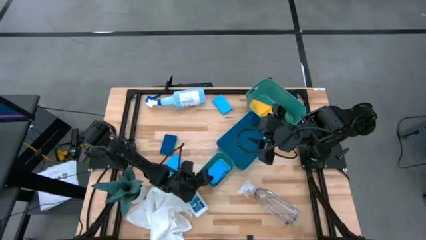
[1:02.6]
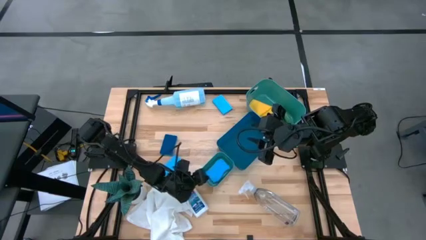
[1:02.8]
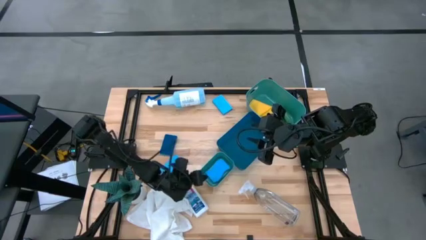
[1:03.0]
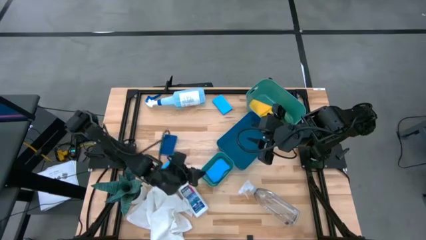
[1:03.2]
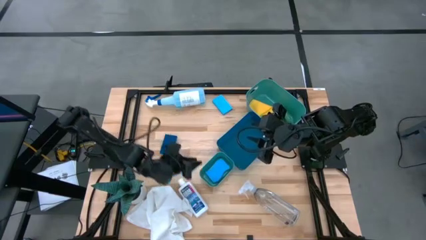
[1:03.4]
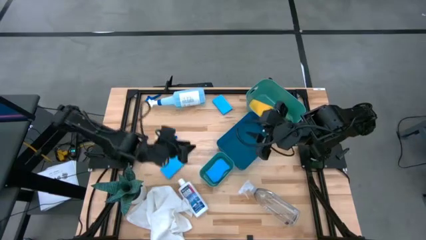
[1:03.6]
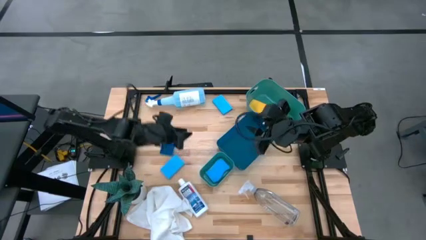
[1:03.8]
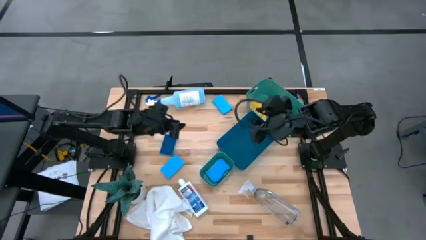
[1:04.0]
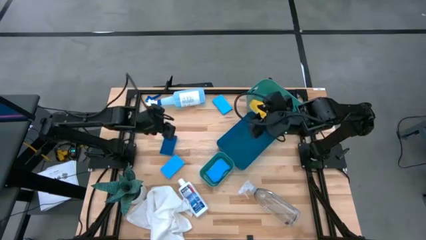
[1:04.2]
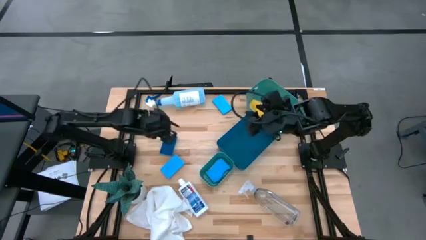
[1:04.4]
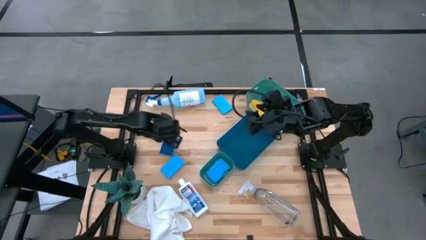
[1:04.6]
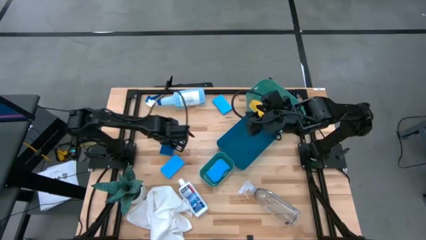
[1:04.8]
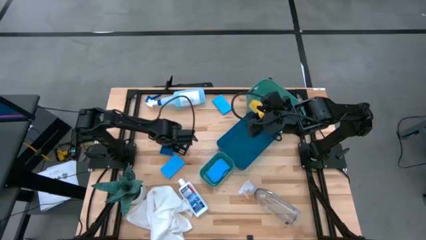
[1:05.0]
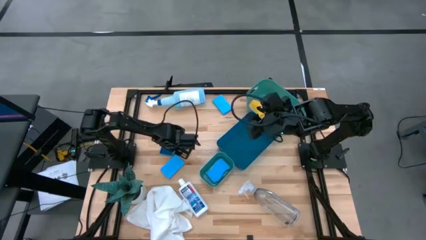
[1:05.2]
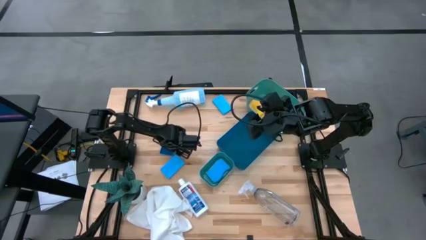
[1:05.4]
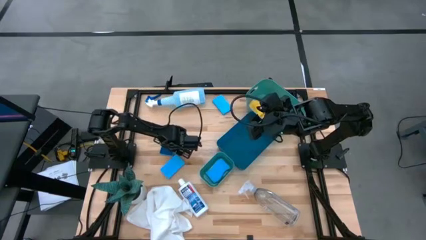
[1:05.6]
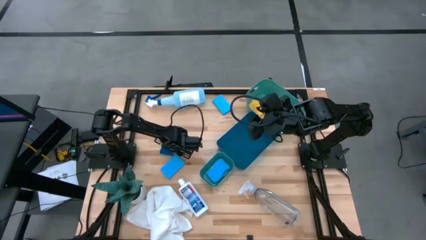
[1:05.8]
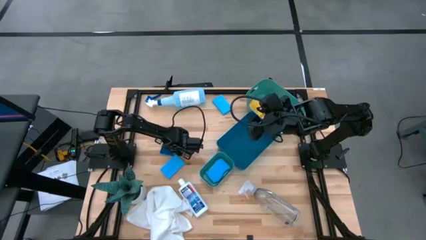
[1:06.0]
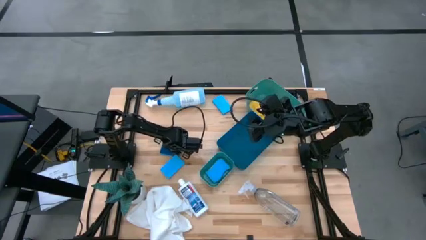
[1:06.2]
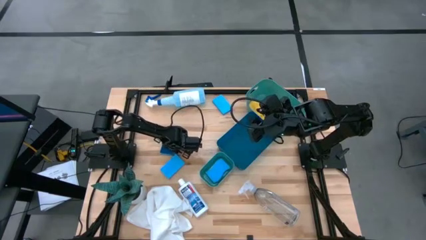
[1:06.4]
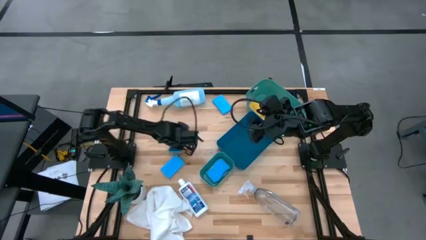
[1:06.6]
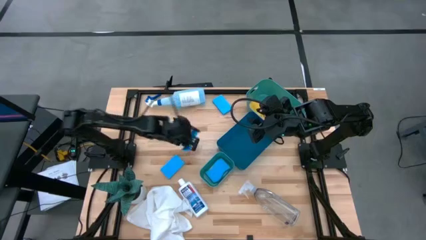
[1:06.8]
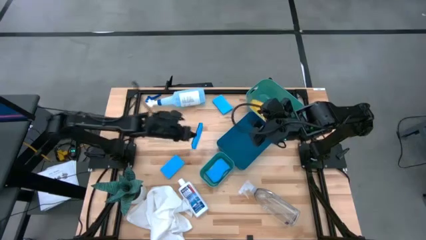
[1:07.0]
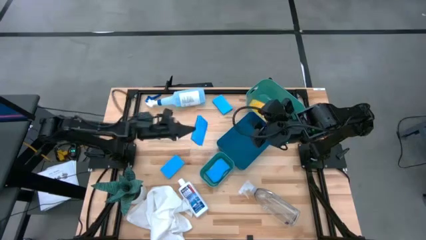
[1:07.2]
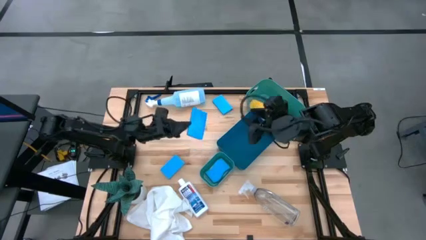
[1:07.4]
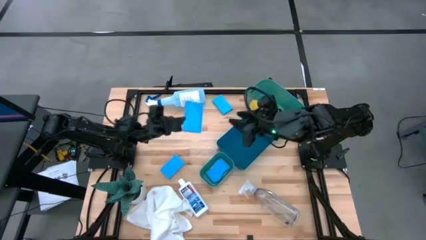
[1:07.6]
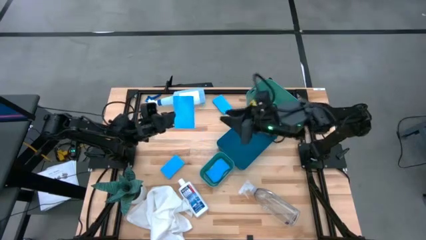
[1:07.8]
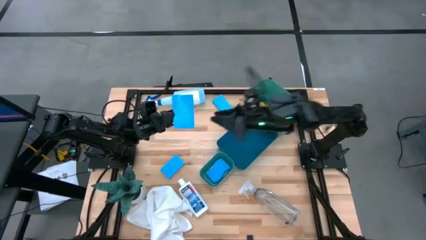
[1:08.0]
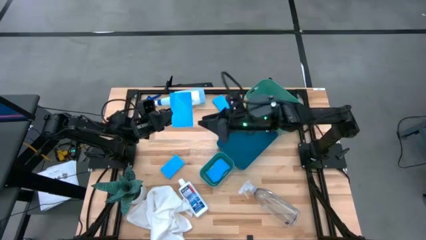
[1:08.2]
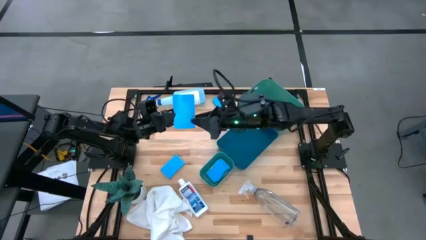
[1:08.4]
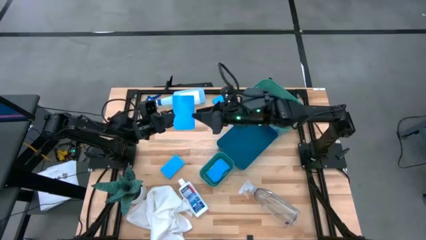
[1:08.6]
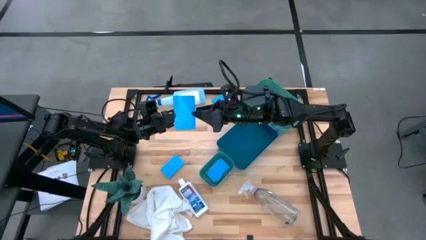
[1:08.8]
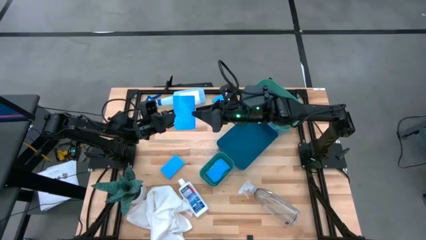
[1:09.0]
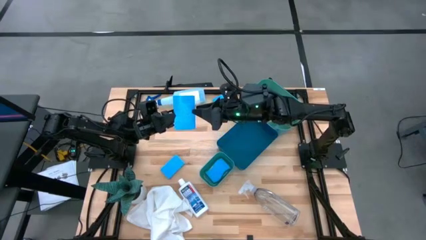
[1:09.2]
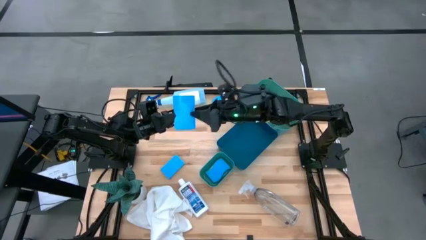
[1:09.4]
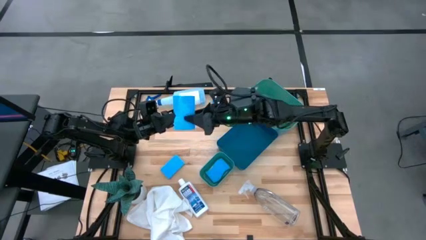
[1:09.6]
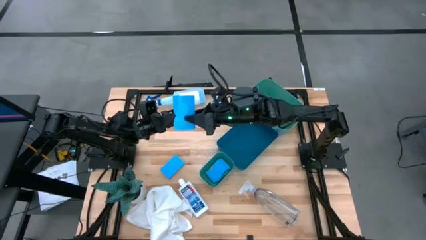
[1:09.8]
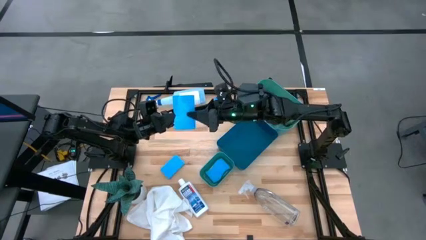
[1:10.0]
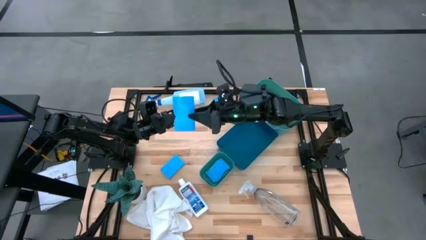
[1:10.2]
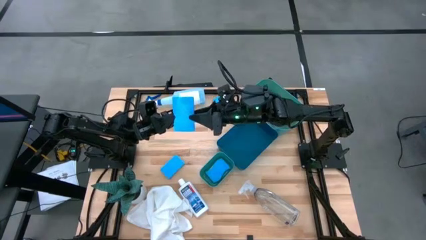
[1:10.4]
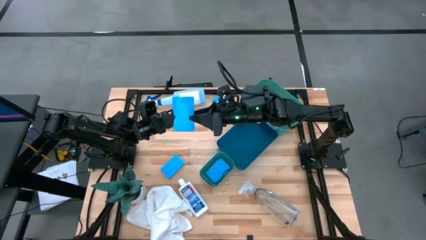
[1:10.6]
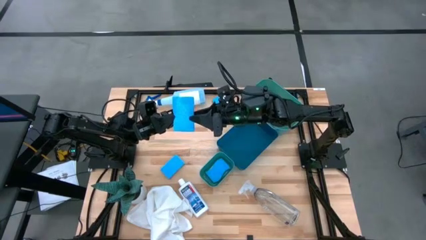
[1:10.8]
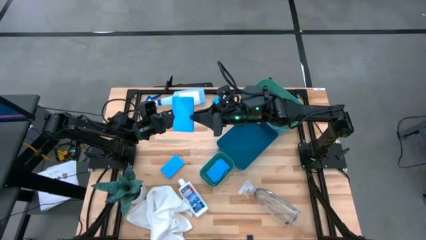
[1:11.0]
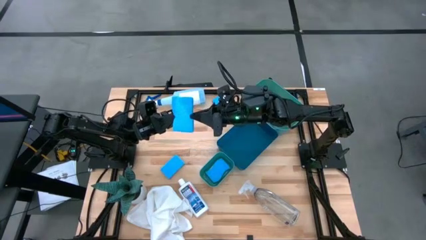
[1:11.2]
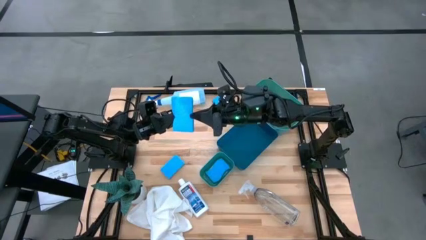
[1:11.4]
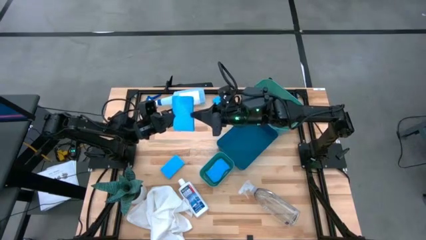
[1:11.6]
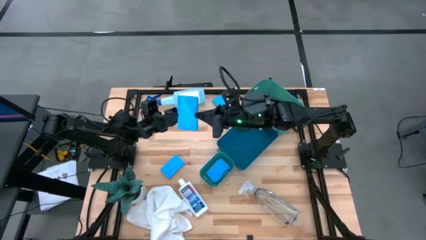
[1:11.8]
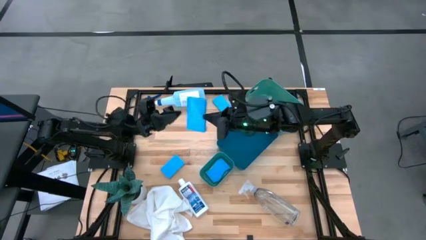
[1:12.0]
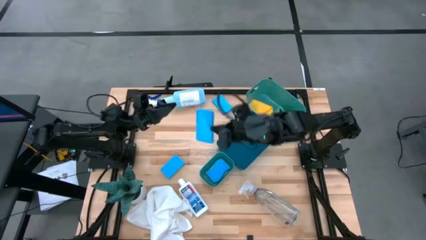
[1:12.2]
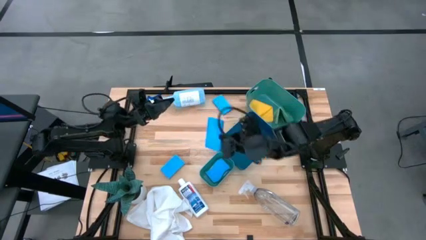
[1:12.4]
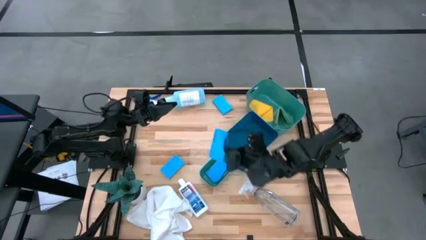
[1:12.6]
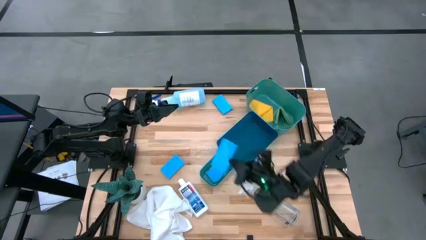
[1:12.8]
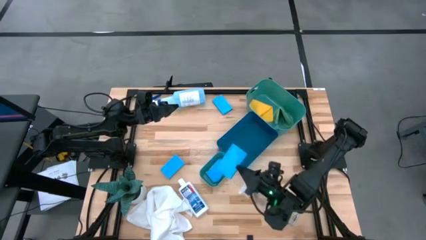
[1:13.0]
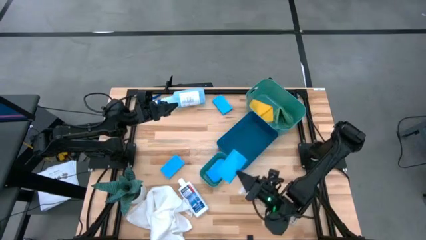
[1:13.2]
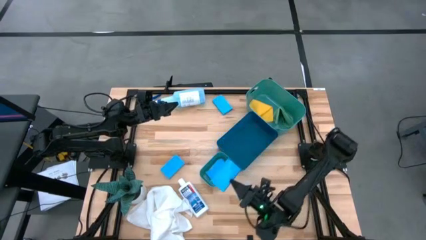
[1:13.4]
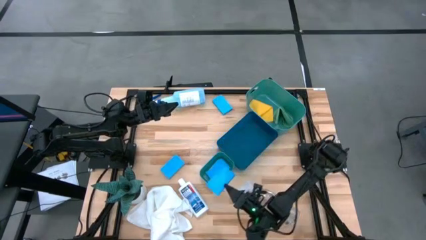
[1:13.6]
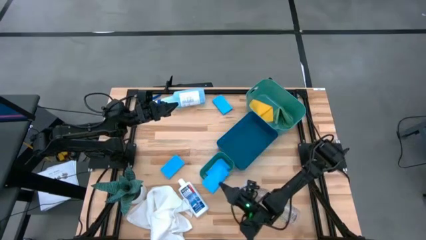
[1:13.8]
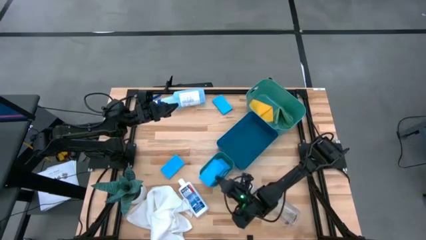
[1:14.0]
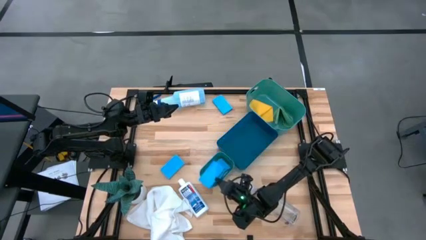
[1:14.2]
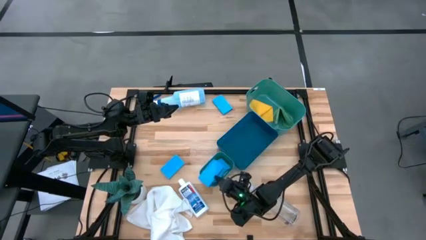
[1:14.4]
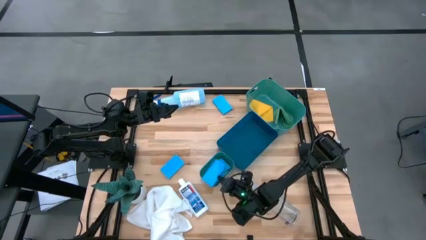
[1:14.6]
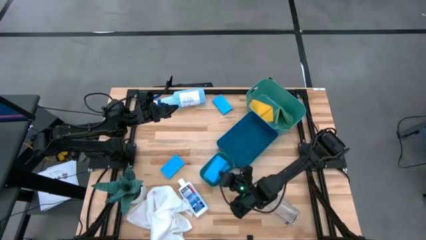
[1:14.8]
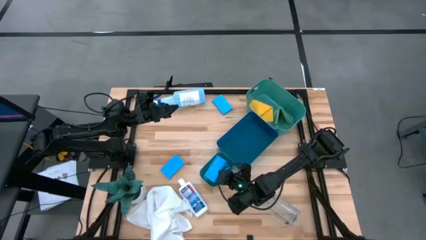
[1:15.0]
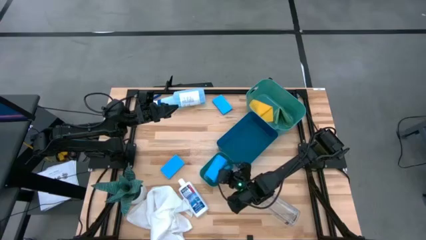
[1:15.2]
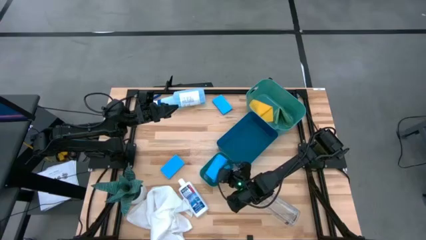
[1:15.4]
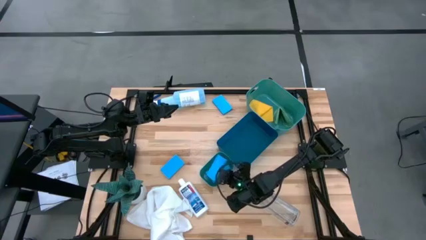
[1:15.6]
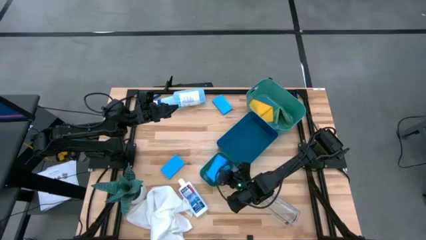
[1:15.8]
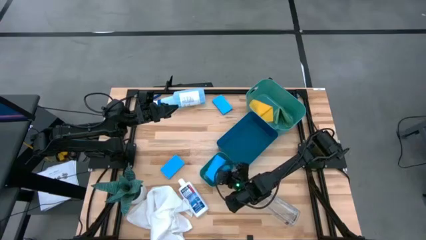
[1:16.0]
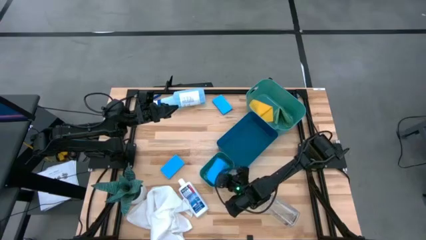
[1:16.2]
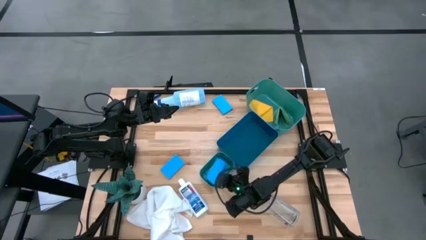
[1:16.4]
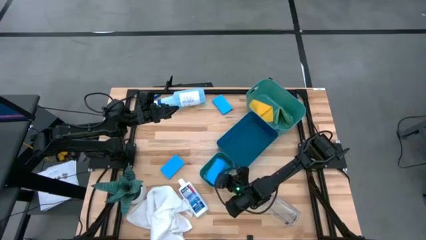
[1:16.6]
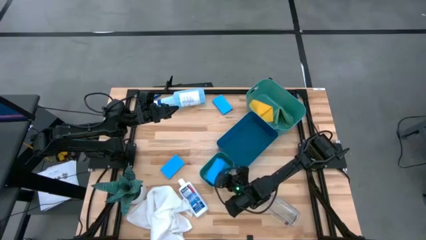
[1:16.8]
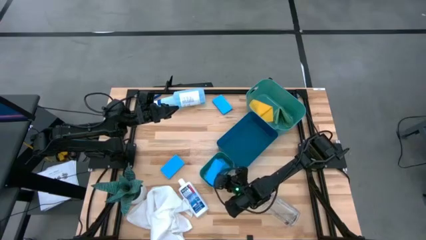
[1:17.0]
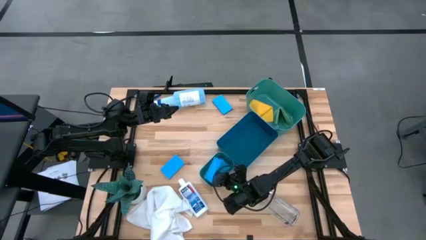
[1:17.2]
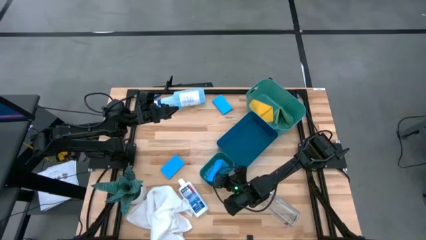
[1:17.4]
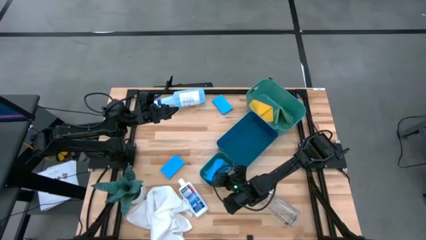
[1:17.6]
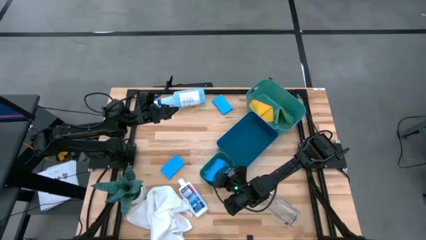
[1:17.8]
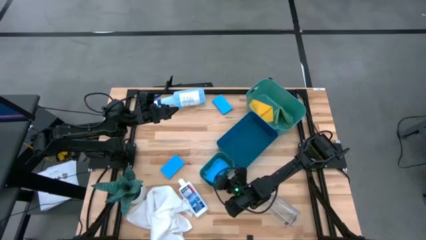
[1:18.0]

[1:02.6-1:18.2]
Task: Pick & Place Kitchen Items
Put the blue sponge into the bottom green bin

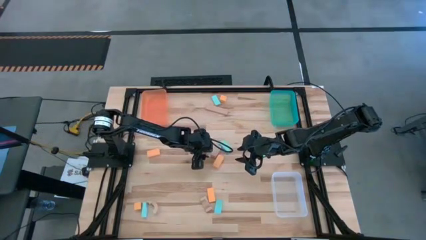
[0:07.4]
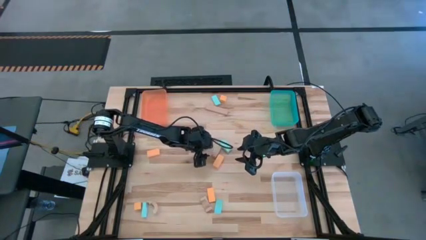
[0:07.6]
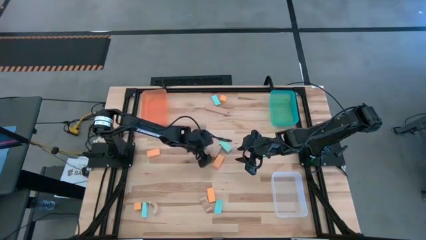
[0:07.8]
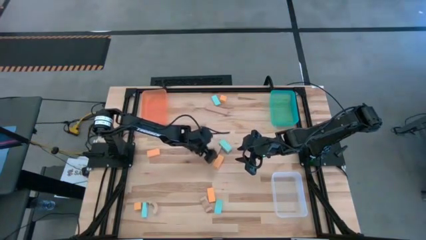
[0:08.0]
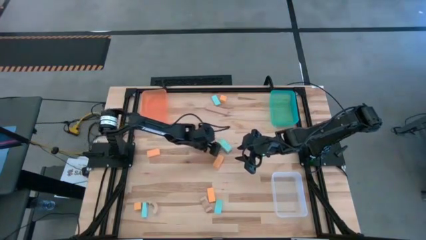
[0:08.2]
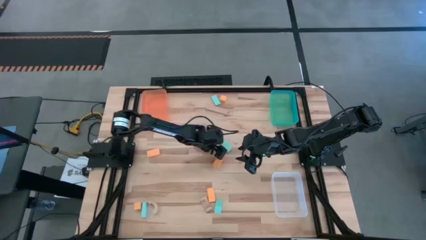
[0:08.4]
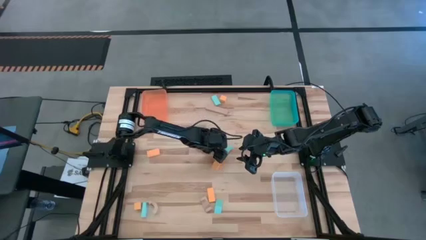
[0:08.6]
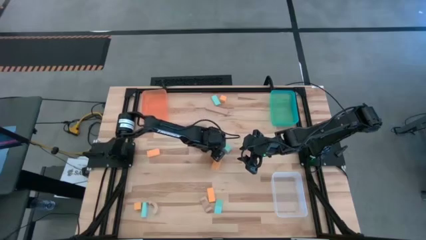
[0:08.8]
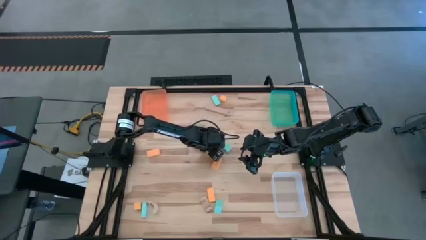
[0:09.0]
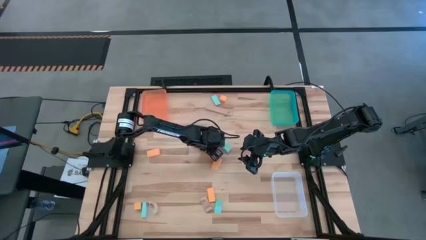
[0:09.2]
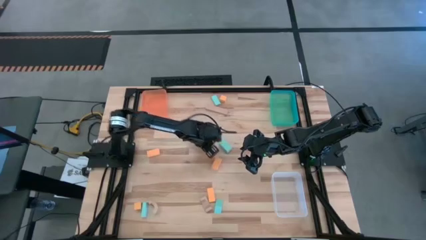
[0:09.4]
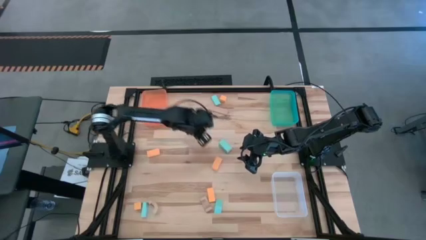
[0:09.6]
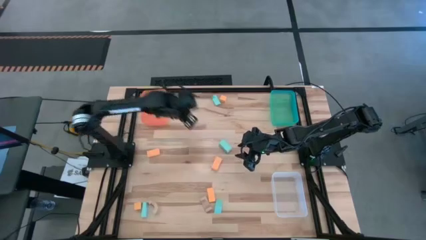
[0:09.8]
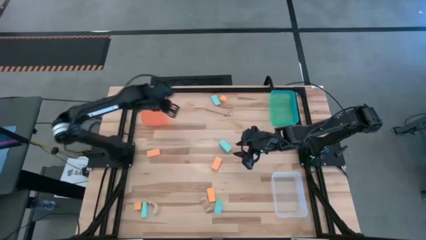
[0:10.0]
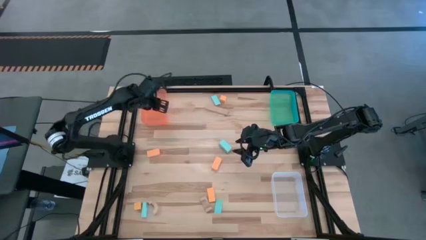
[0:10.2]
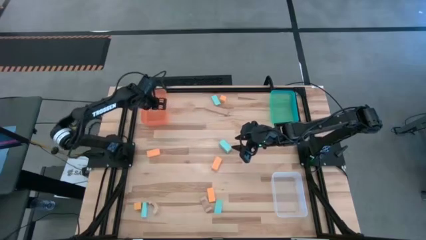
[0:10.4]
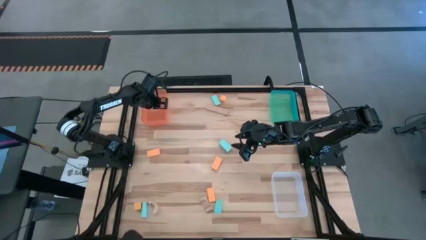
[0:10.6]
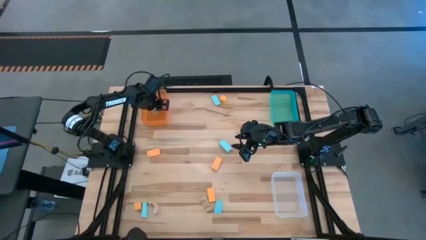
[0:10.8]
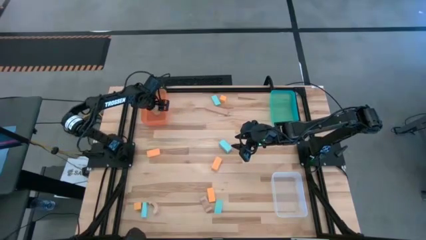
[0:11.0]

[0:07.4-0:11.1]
Task: Sort & place blocks by color
Put the brown block into the orange bin
